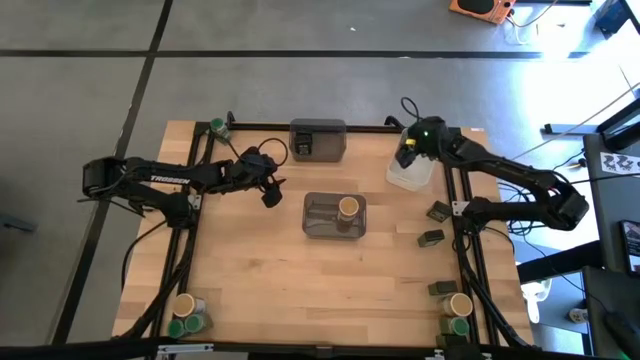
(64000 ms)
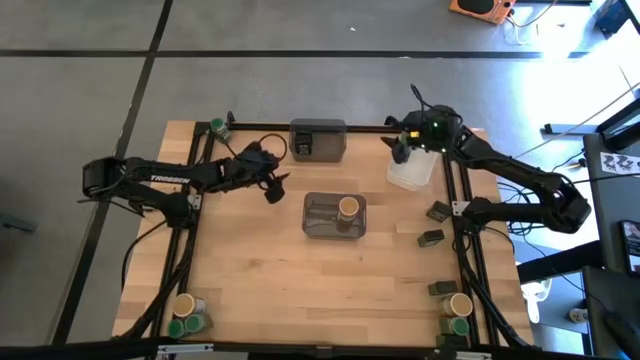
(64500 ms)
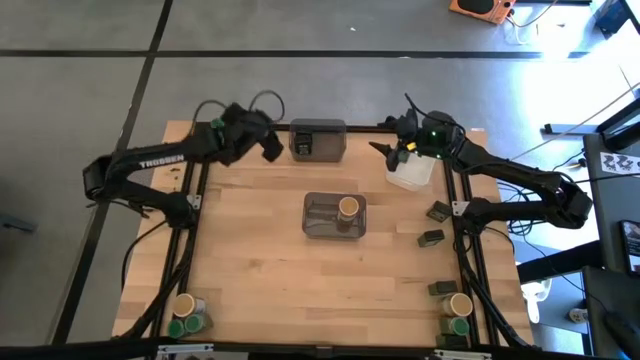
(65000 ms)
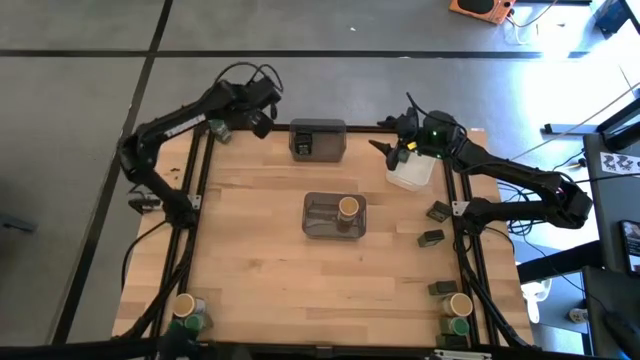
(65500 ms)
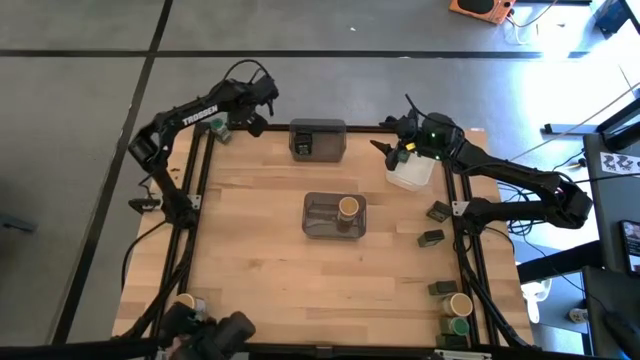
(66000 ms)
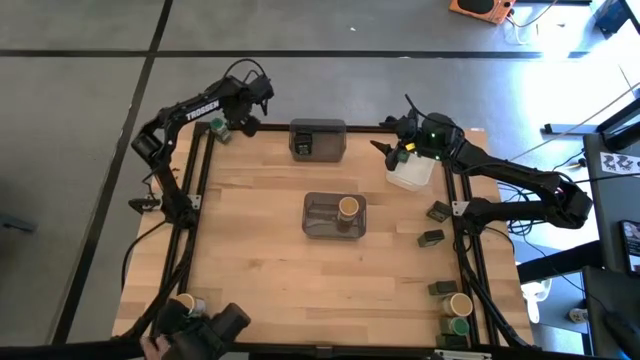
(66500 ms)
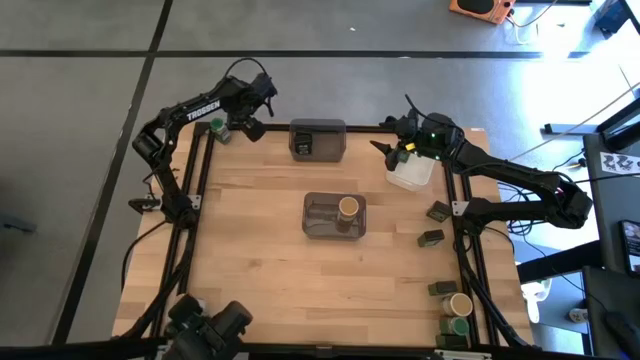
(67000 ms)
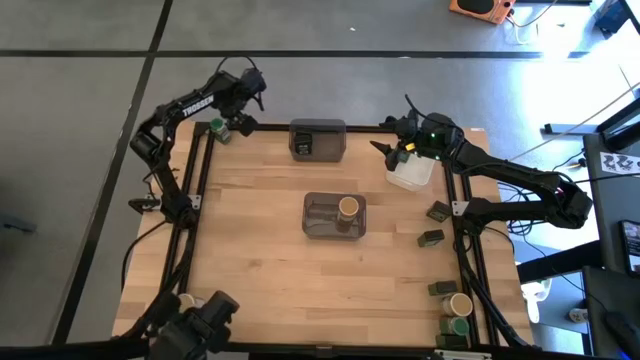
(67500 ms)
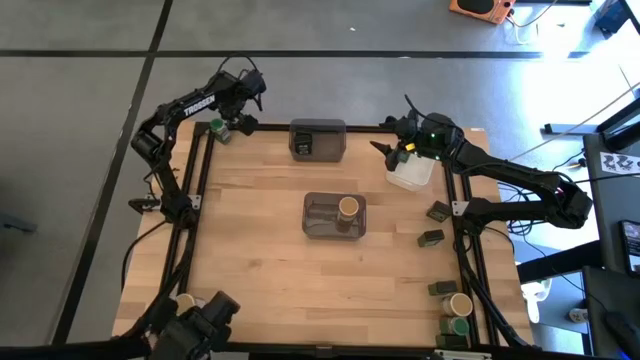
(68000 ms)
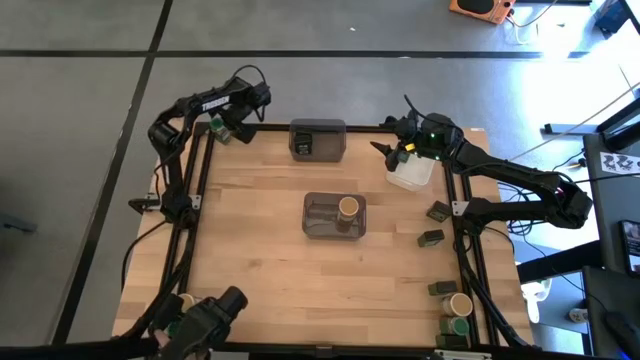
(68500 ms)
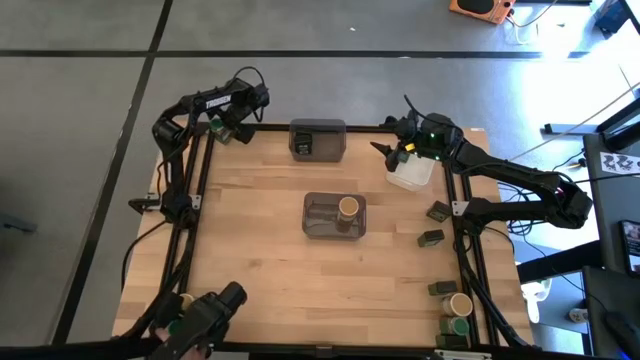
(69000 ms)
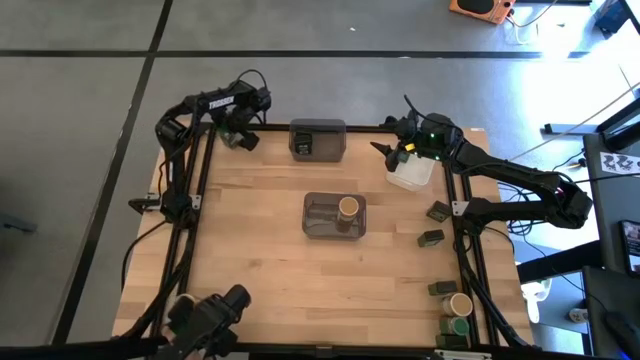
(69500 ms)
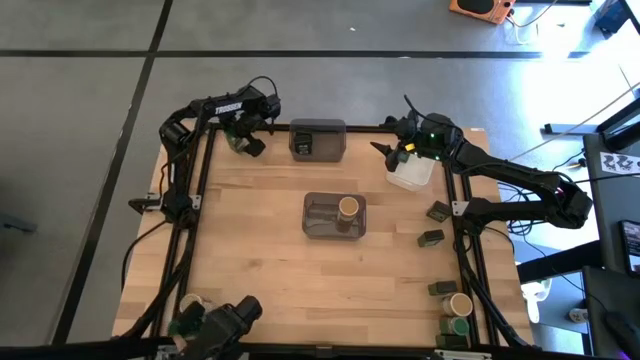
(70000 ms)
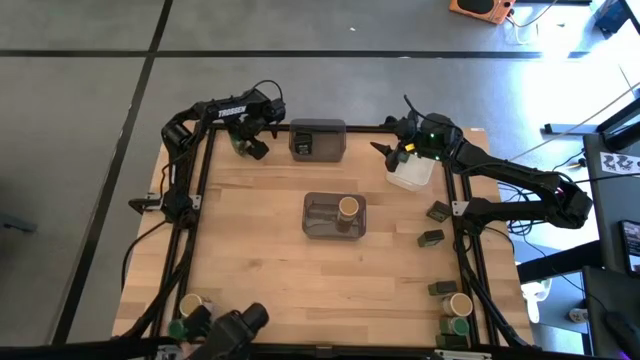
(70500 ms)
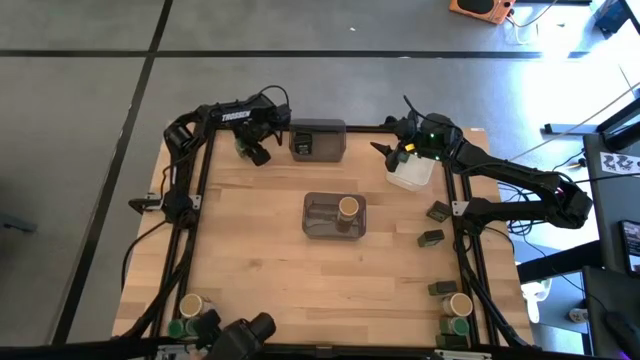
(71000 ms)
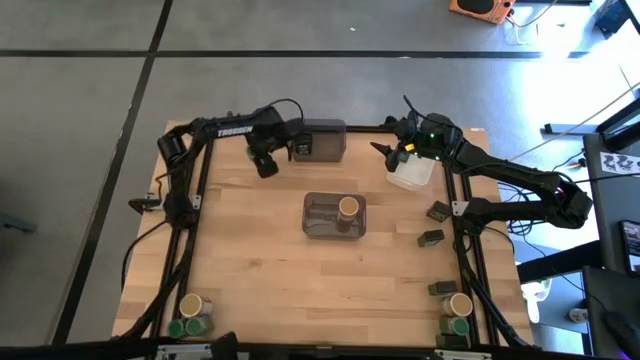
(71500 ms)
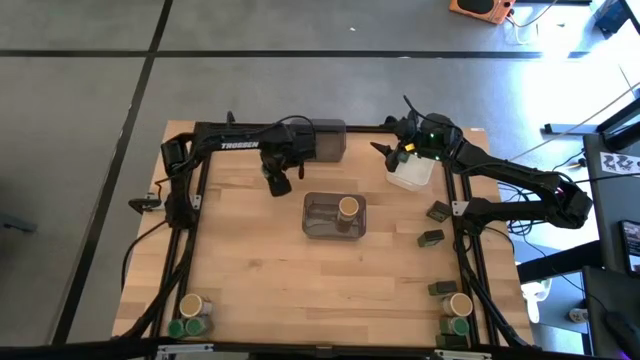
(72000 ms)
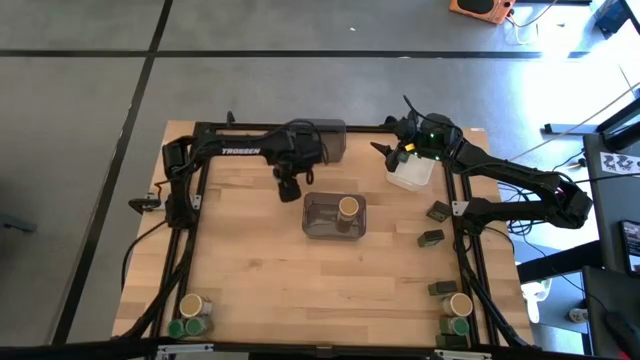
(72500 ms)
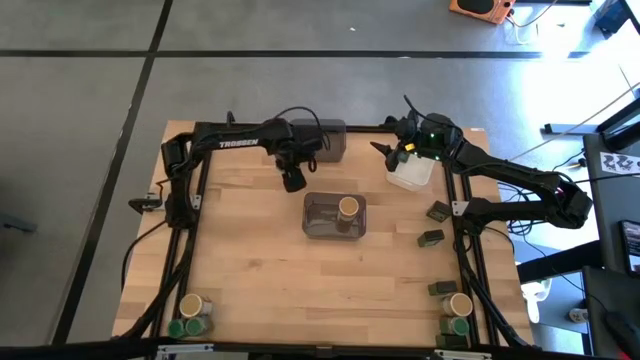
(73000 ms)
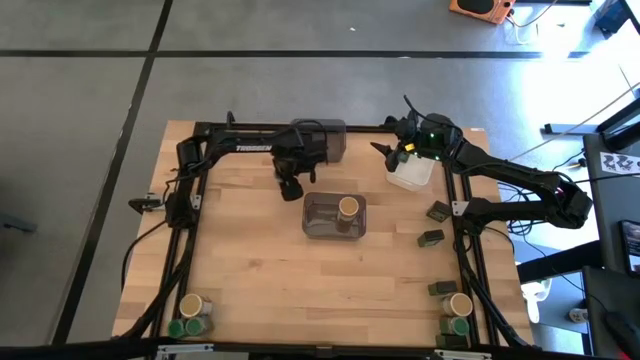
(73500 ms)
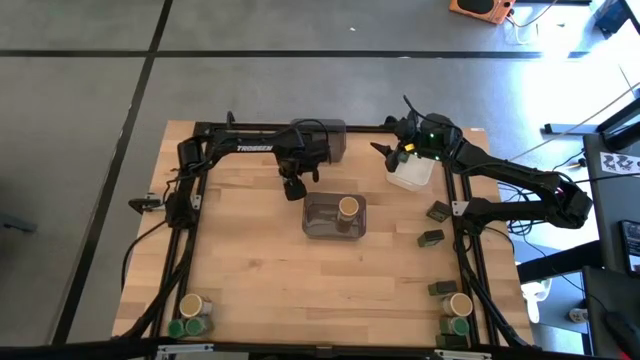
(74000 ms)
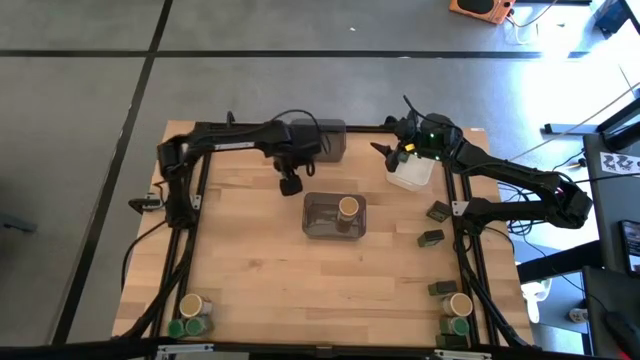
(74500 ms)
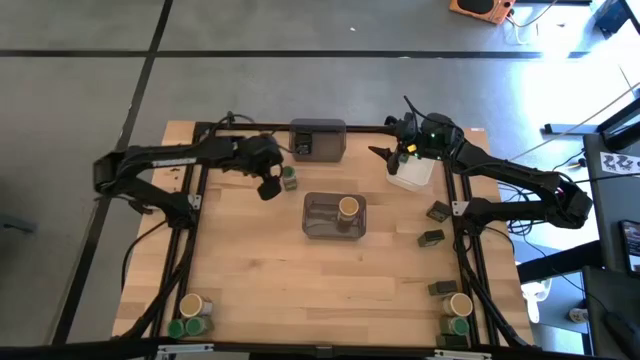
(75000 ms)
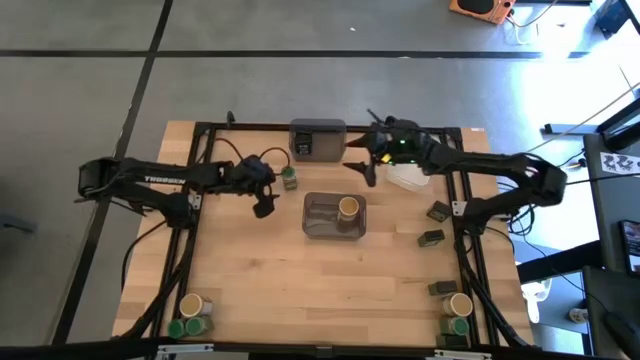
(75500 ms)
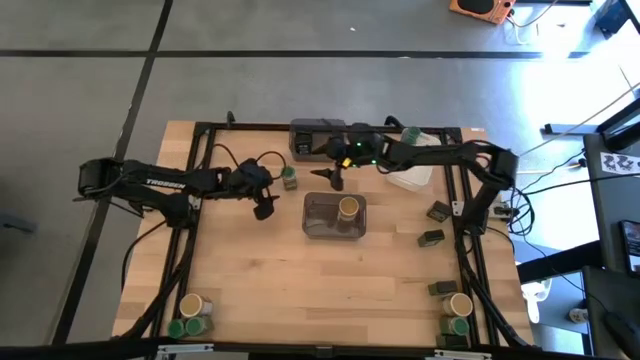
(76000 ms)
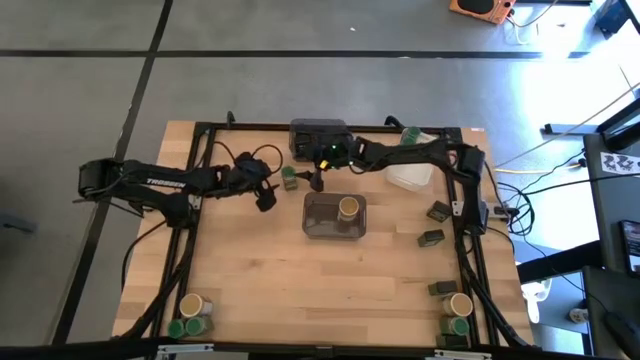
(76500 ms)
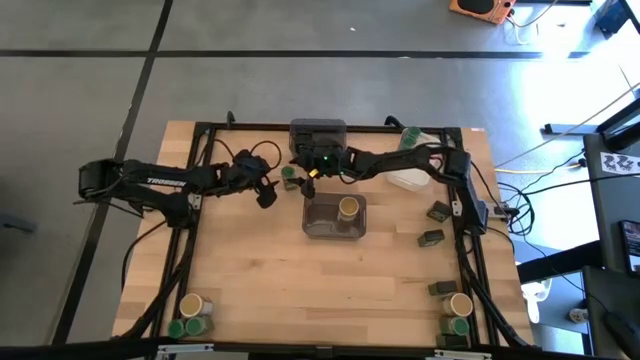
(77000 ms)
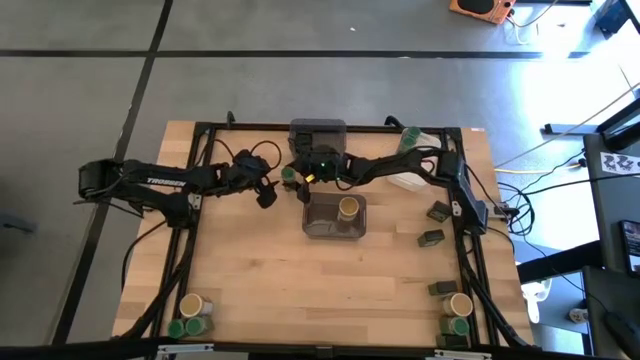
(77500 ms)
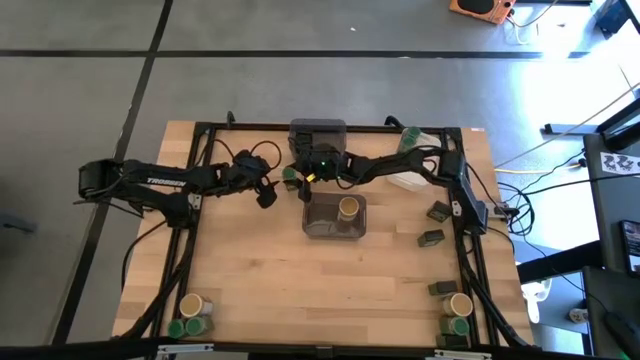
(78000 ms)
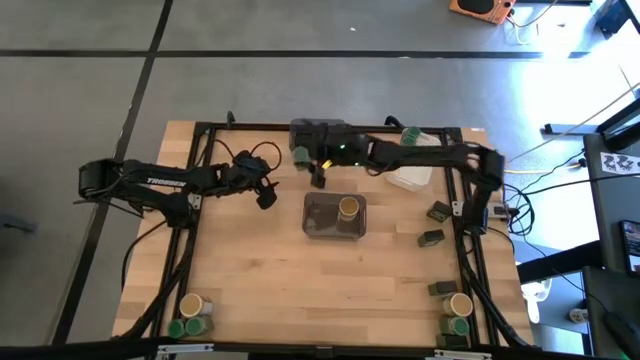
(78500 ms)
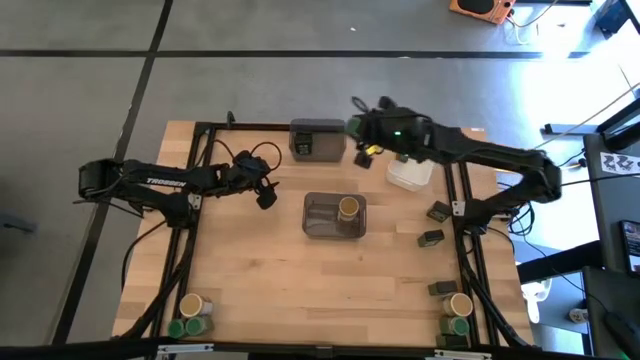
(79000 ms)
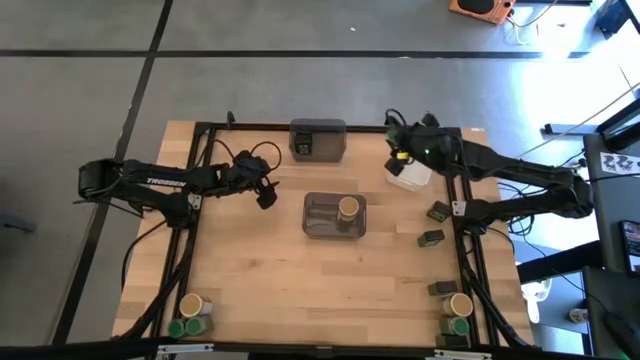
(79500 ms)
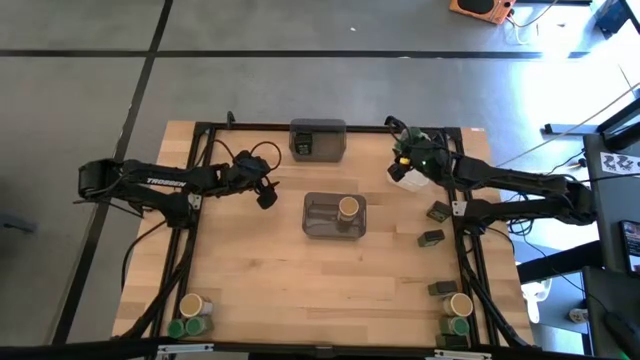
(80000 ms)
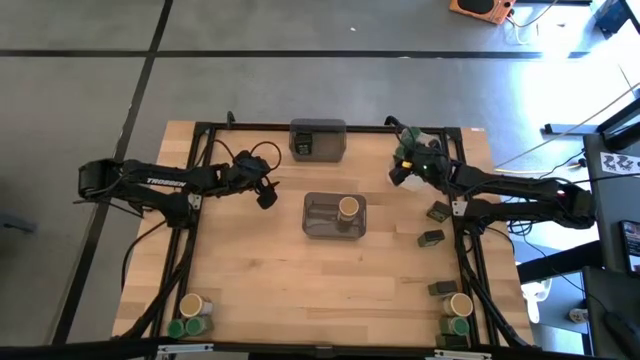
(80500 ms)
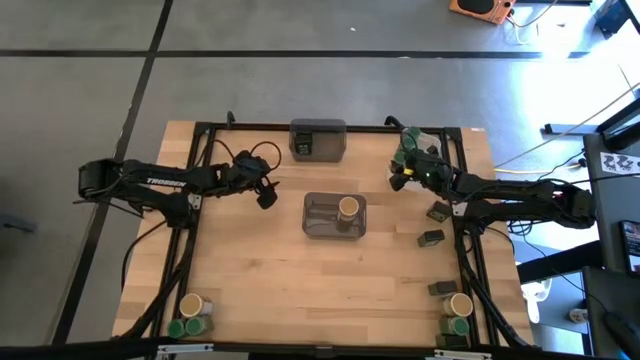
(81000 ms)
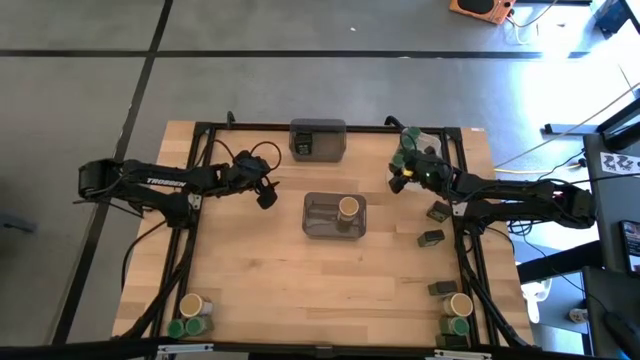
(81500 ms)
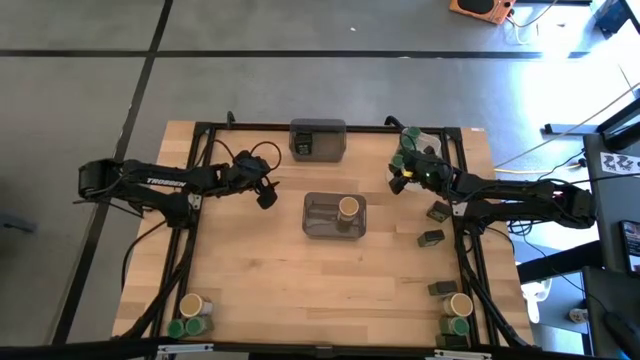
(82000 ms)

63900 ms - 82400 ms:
Task: Sort spices by type
Put the green seasoning bottle into the white bin

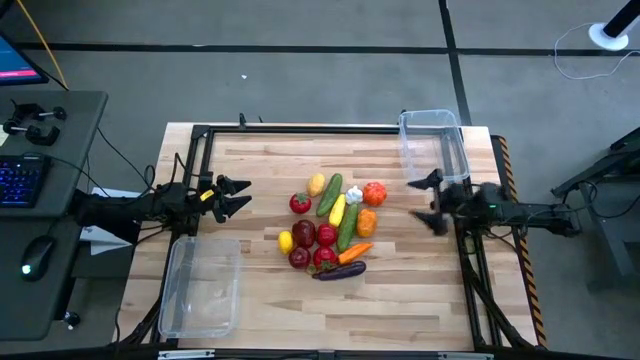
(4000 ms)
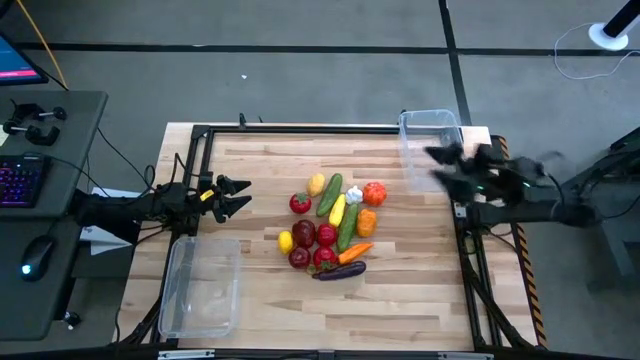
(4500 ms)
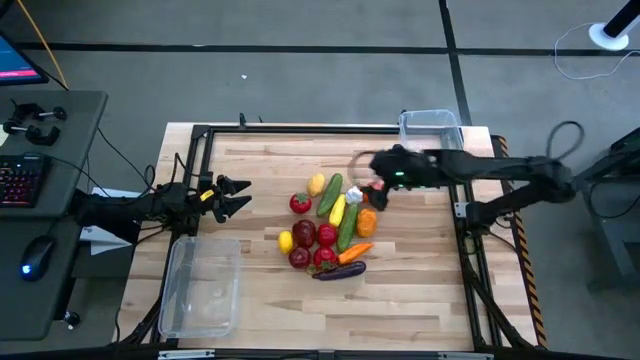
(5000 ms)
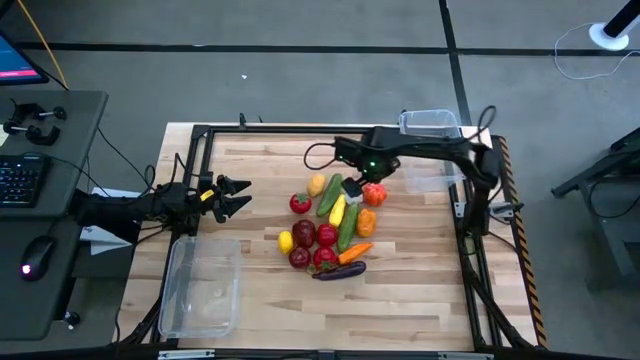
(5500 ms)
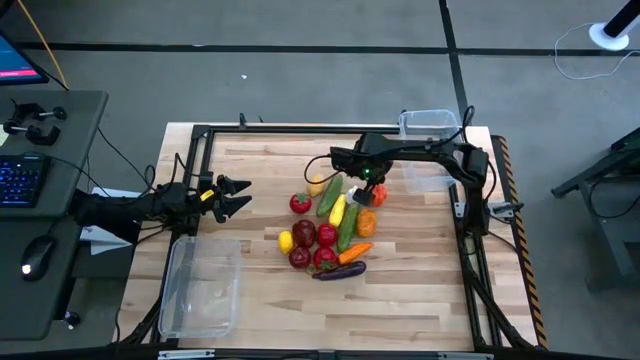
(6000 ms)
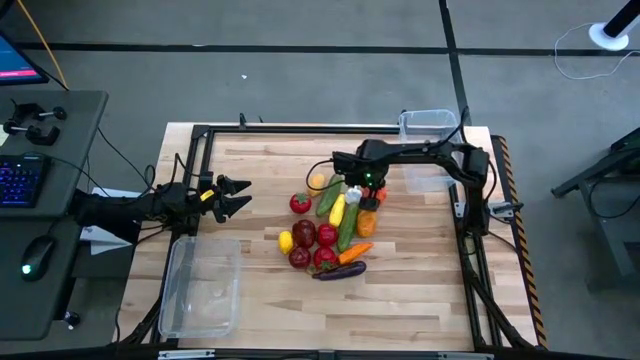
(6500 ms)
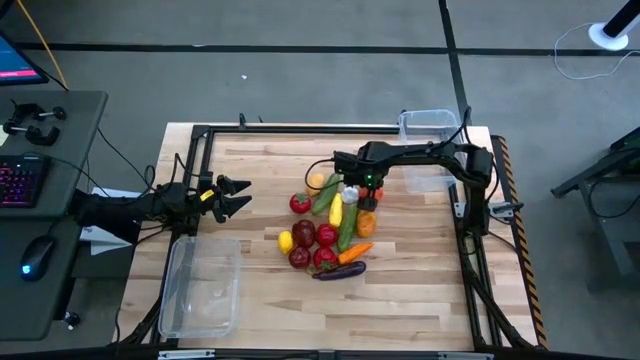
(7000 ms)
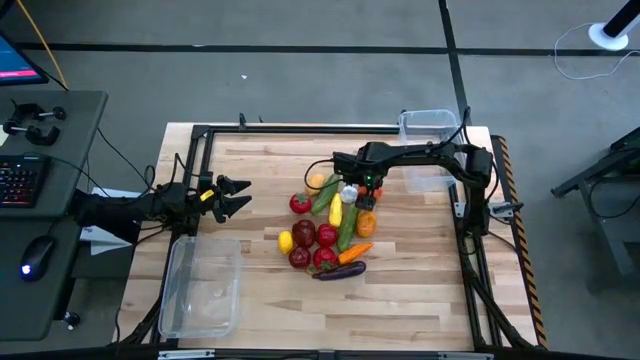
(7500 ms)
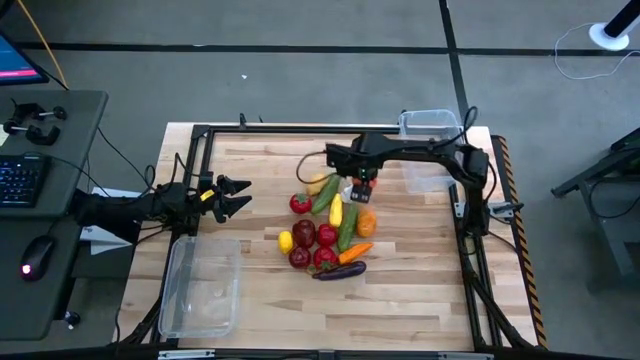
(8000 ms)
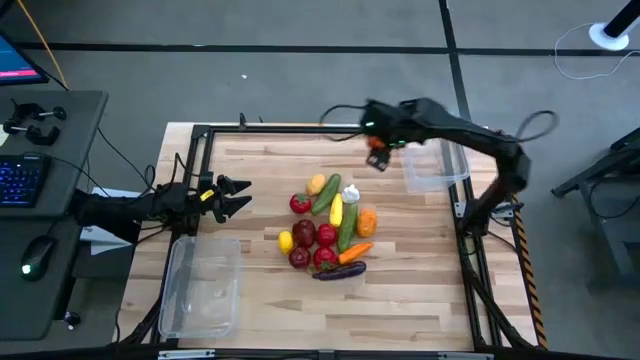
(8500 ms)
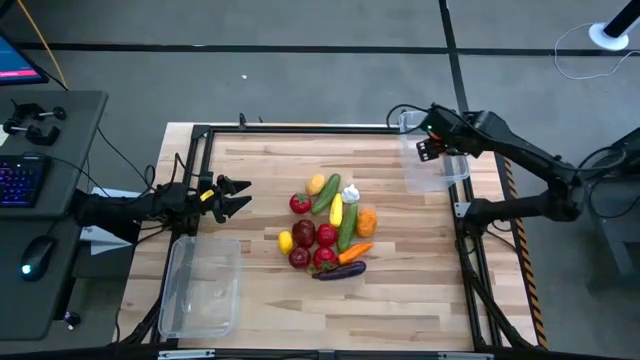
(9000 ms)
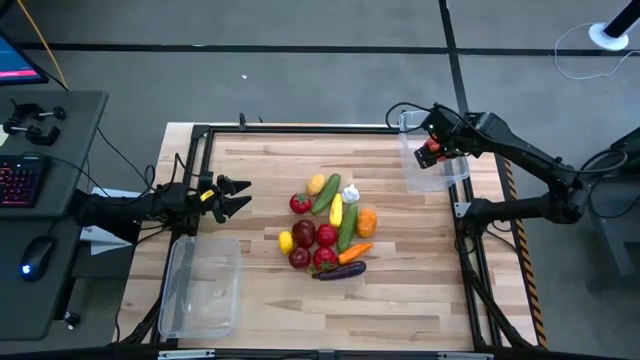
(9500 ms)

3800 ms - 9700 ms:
Task: Sort produce into baskets
Put the orange squash into the top transparent bin
